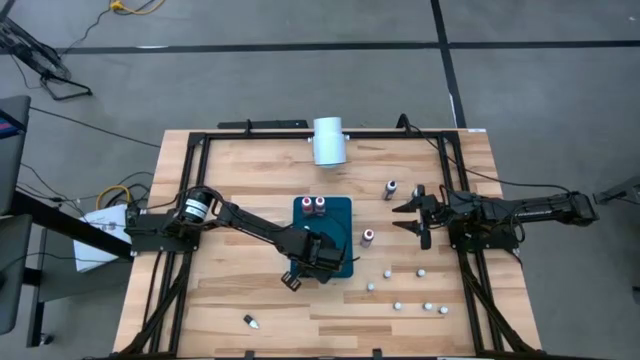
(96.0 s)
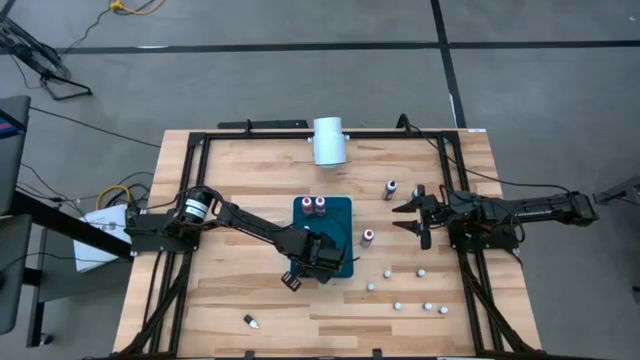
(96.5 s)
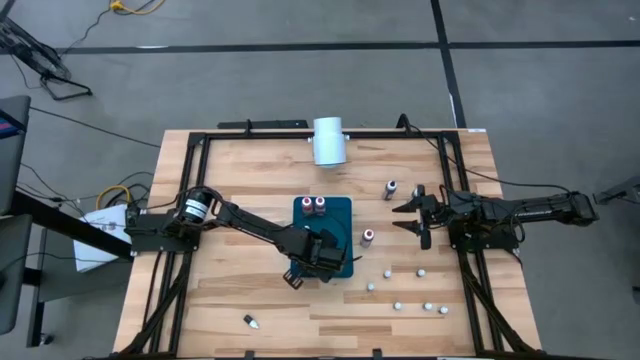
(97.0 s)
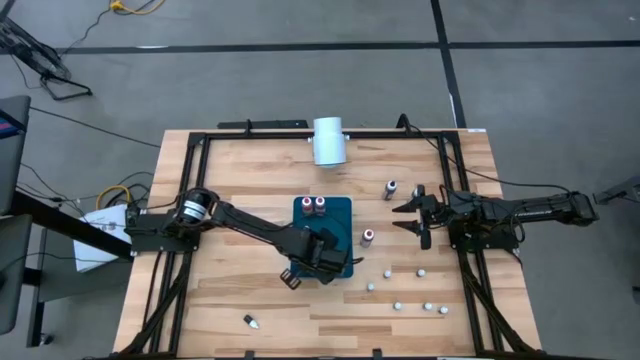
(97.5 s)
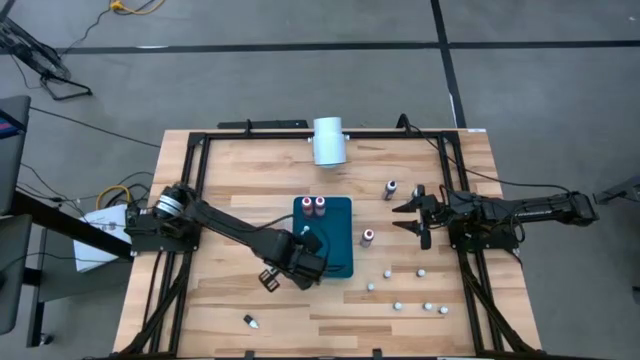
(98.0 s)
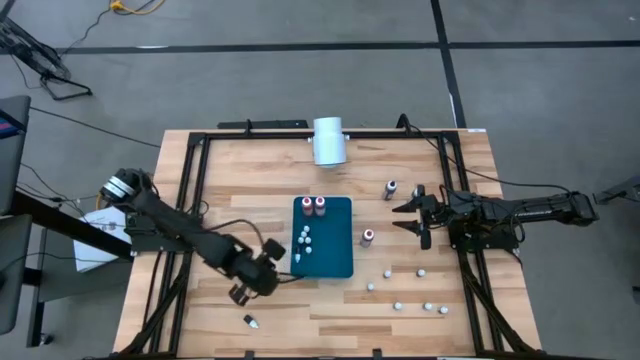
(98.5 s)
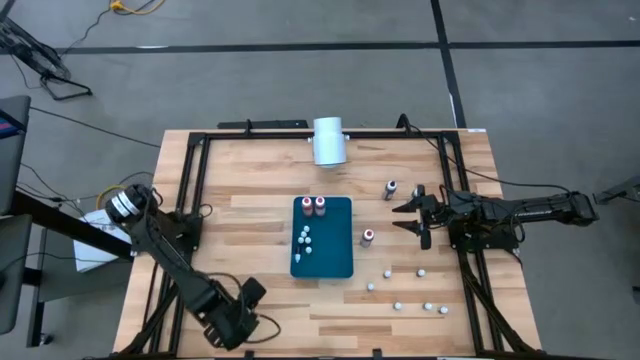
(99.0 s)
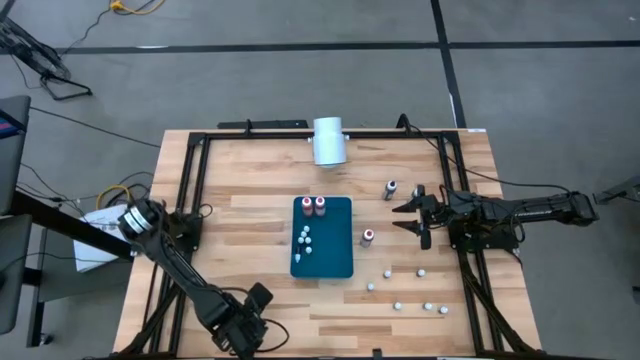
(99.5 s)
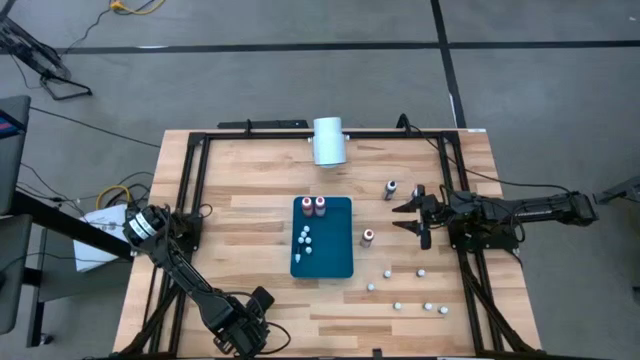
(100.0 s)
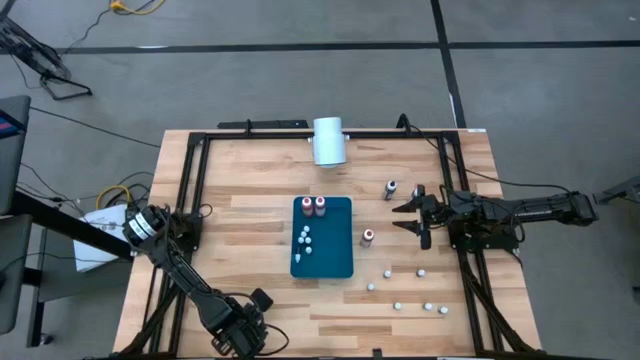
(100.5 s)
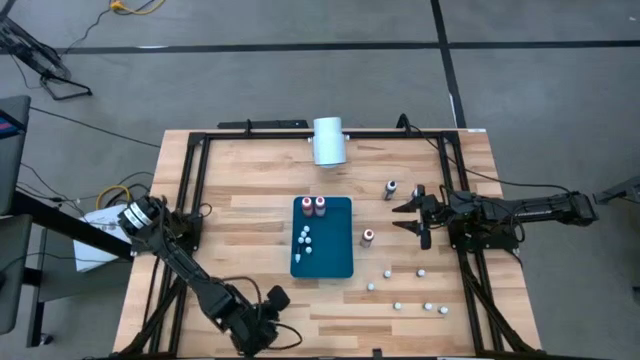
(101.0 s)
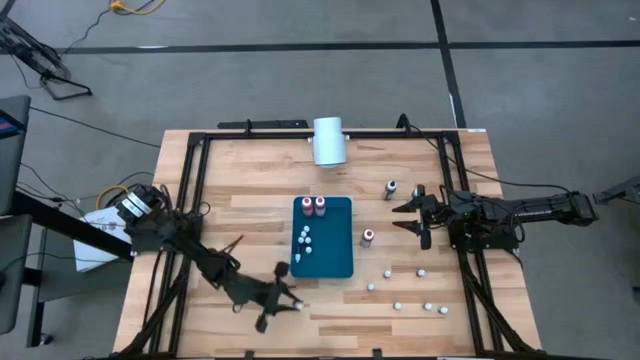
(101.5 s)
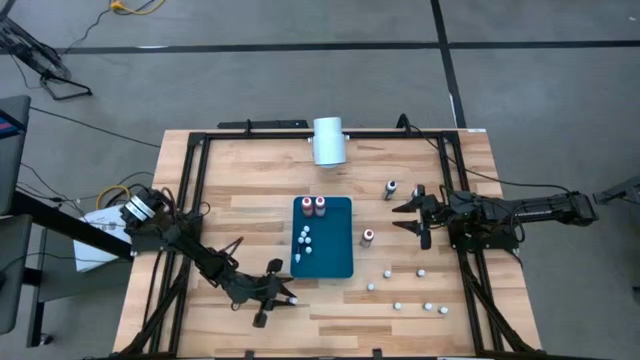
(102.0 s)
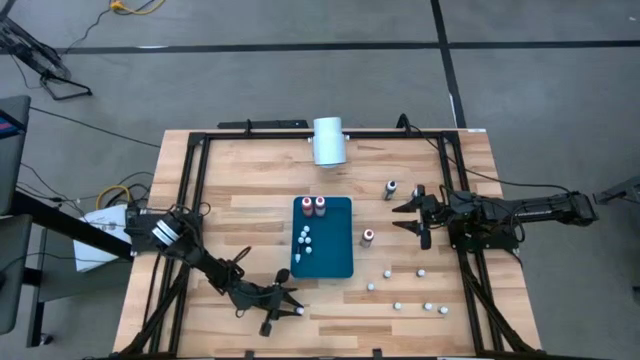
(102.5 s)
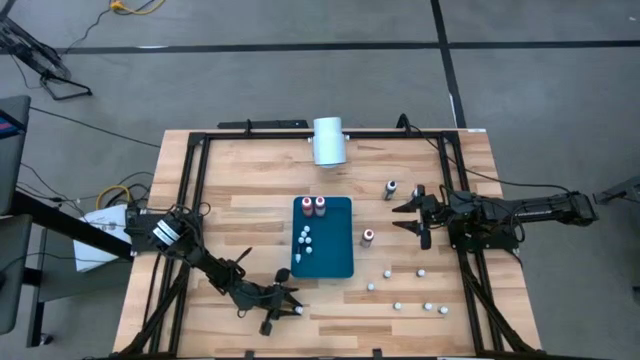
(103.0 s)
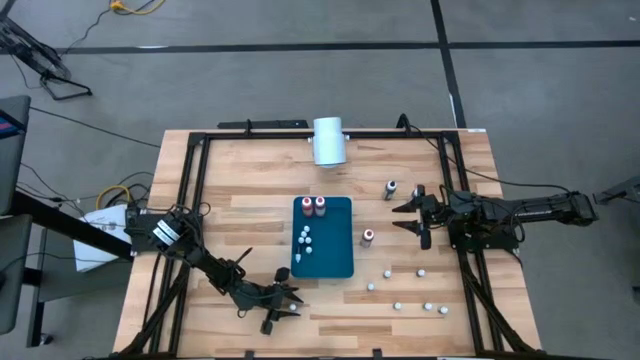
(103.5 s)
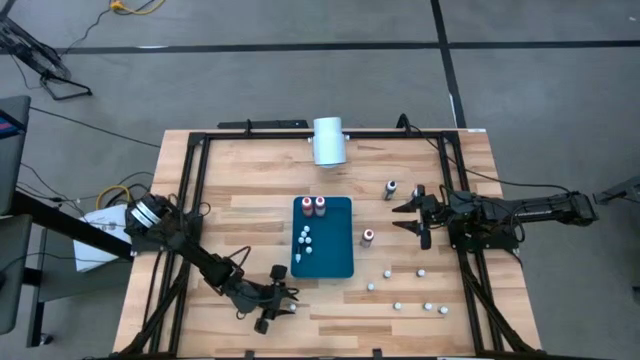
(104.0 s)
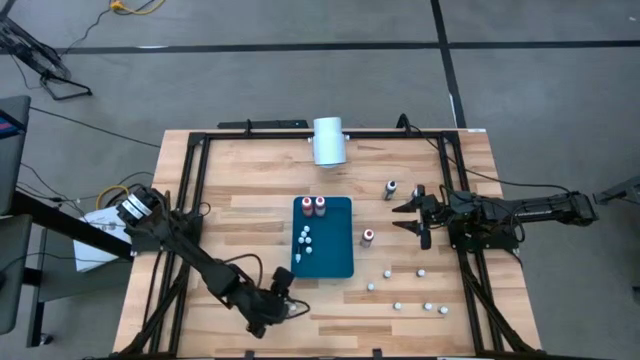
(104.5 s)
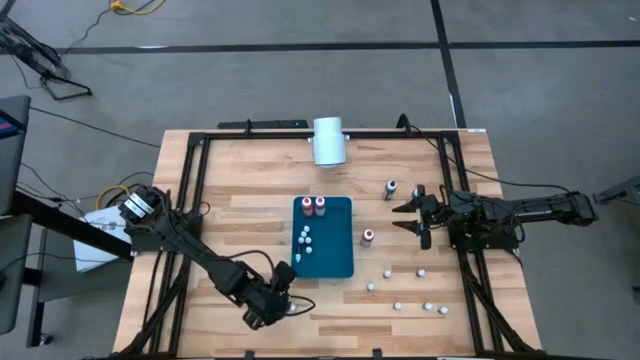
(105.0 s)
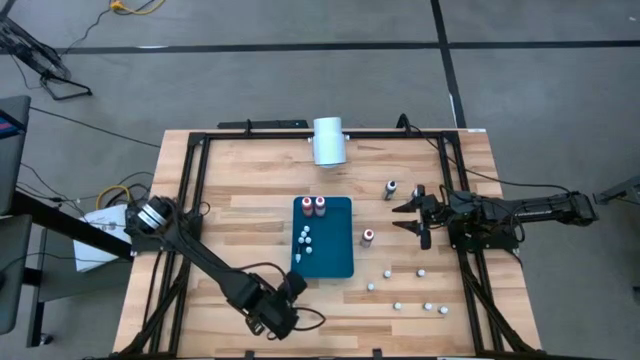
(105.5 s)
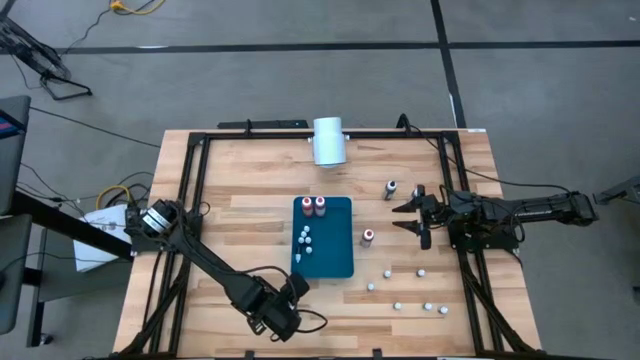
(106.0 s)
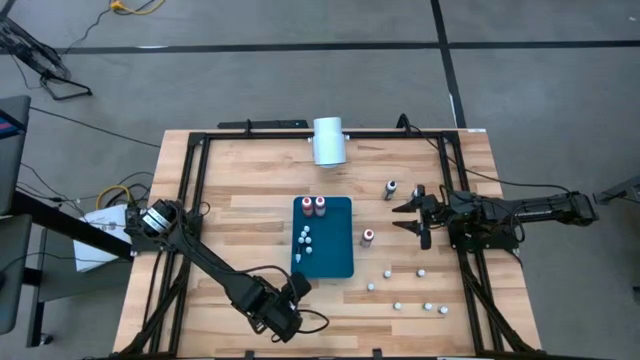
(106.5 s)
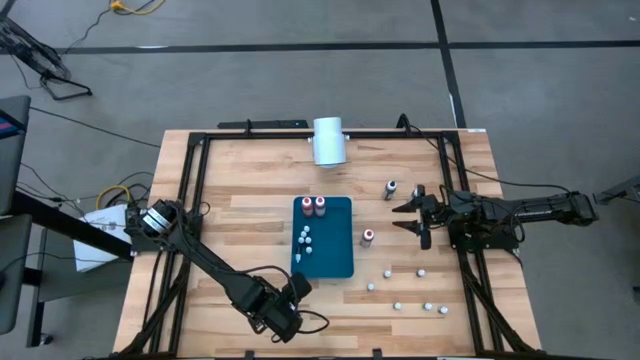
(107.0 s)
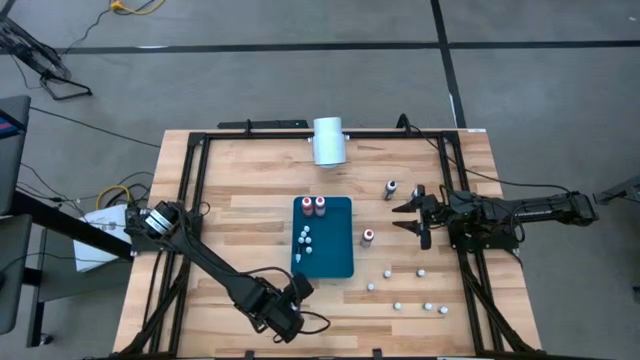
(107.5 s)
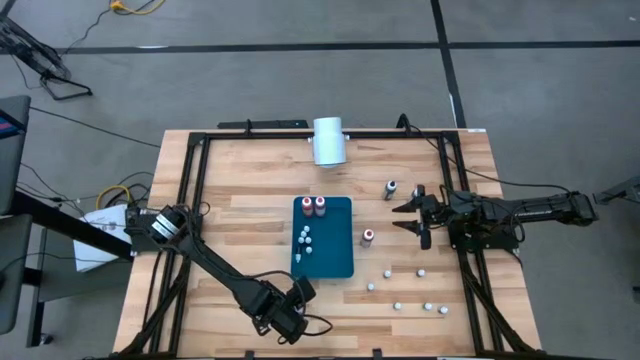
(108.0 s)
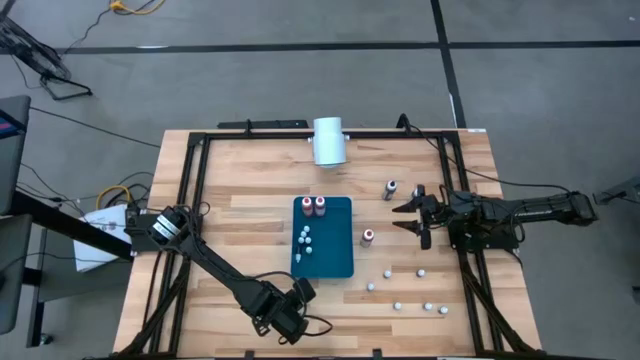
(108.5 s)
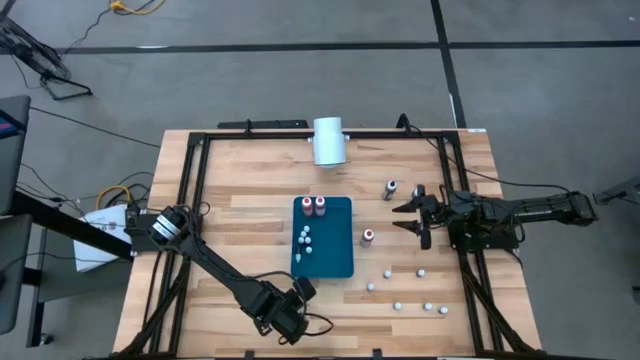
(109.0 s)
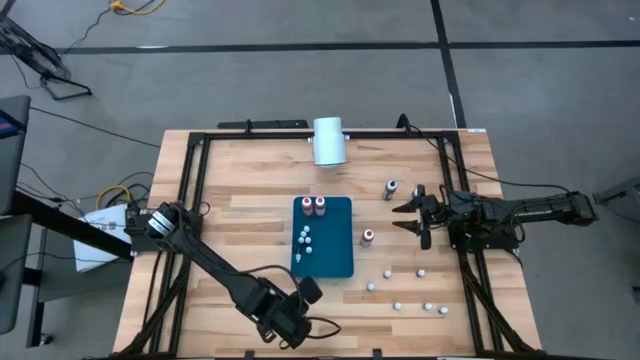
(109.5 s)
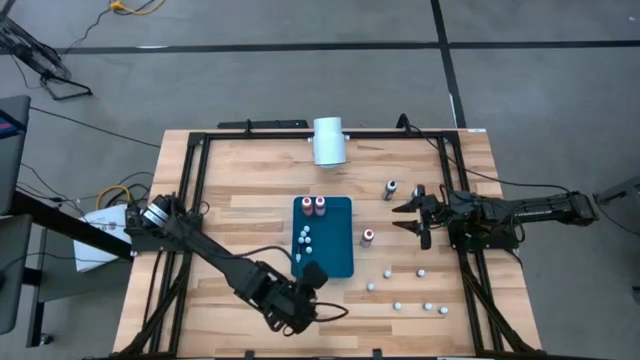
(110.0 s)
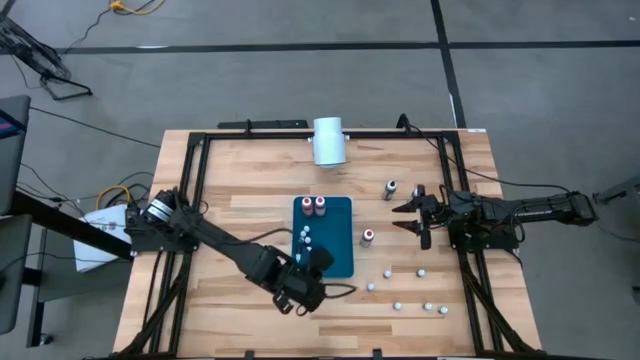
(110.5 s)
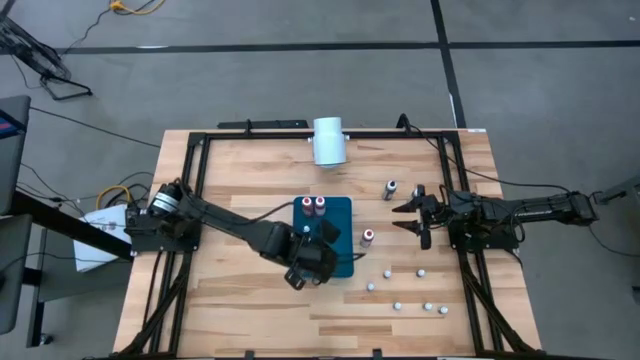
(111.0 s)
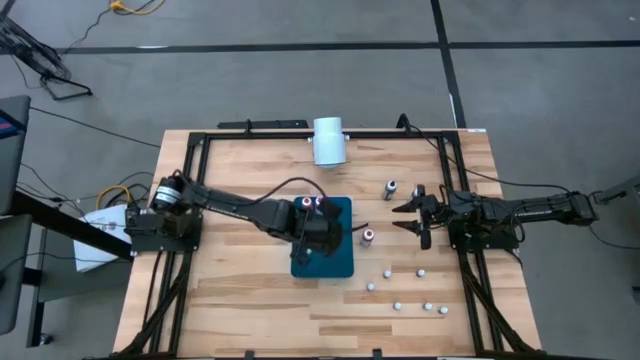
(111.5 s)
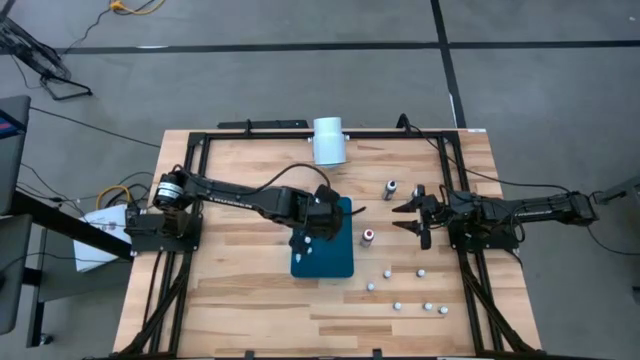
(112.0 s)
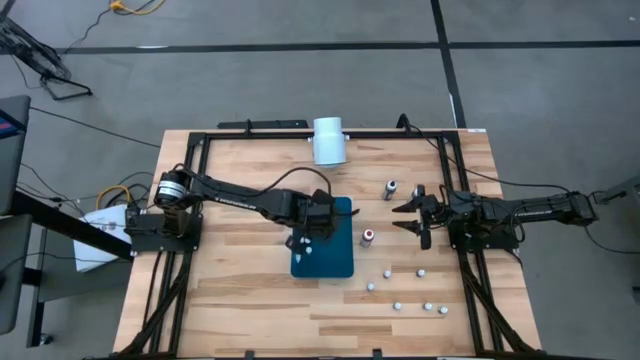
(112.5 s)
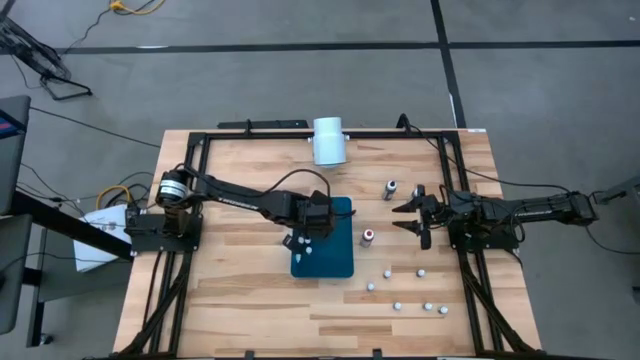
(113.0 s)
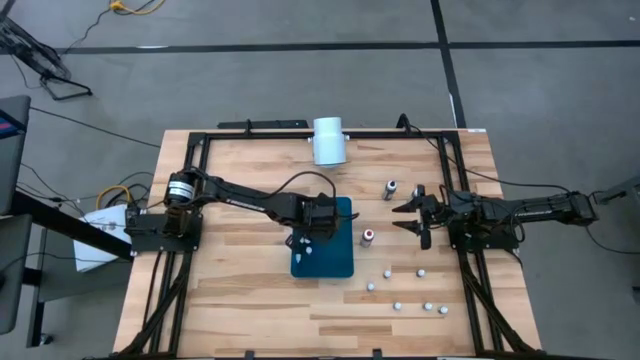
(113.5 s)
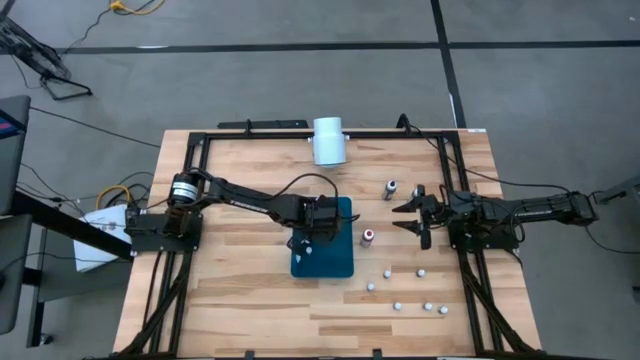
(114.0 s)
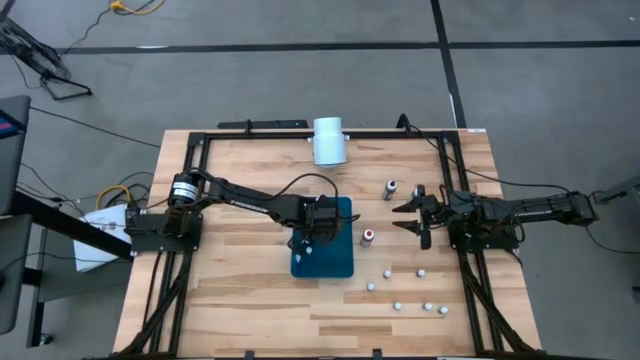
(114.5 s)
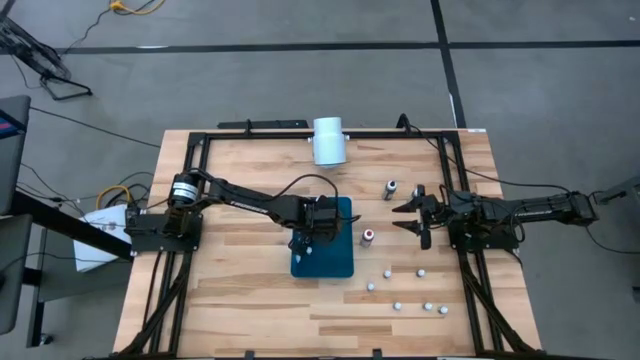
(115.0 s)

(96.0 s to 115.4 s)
Task: Pick & Place food coloring
Put the small black food coloring bottle into the blue bin

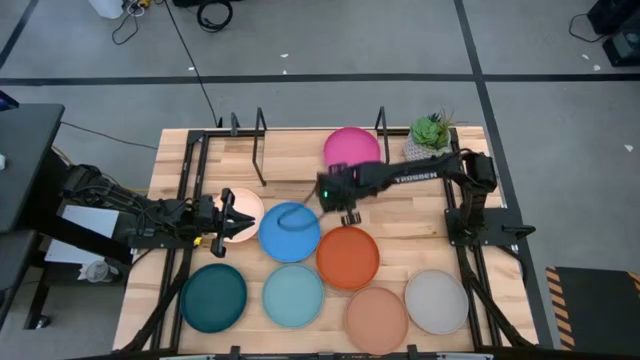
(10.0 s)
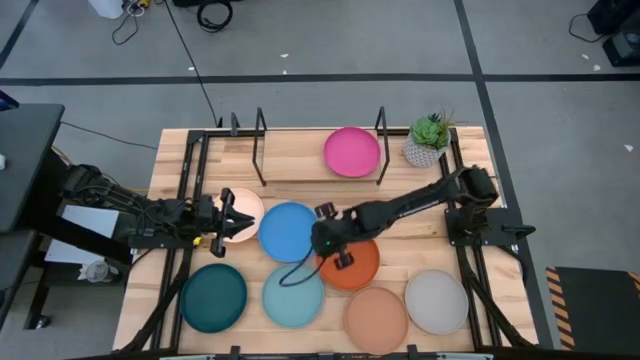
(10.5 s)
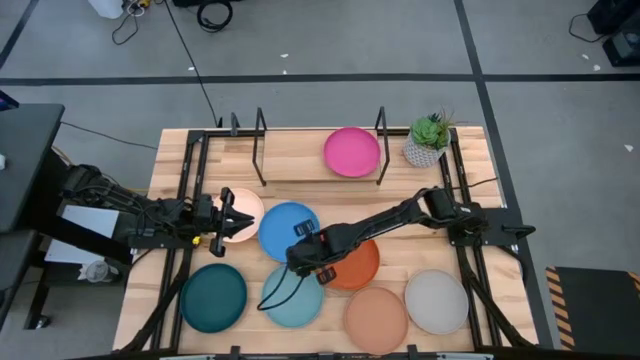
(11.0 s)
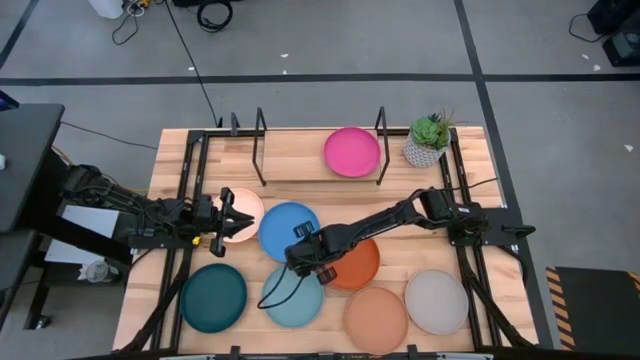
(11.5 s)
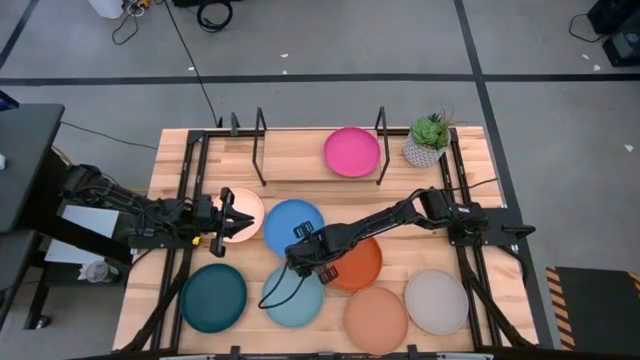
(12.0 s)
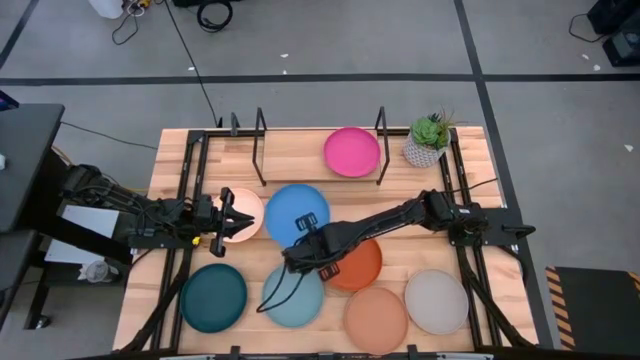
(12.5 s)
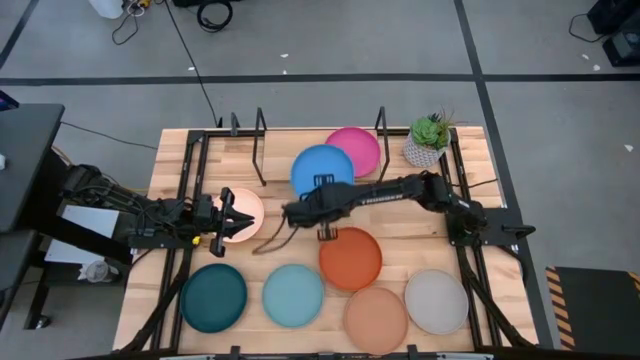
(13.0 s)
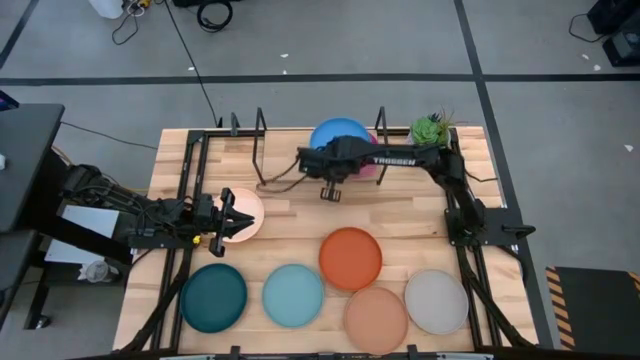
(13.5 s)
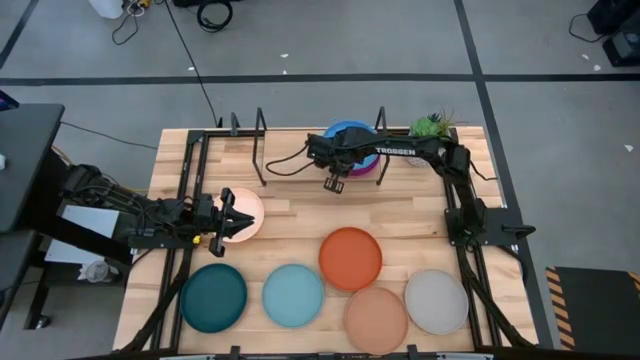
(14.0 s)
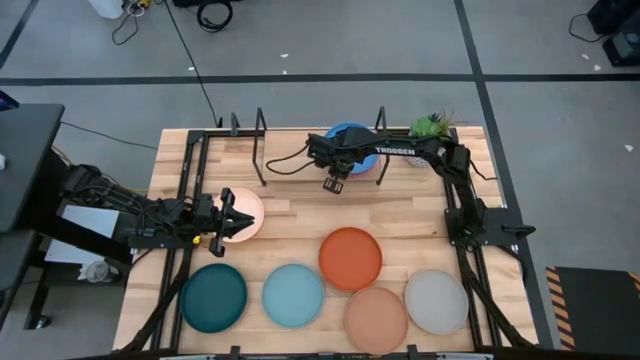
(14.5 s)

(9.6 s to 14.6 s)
Task: Place and stack plates onto a shelf
Stack the blue plate on top of the pink plate on the shelf
